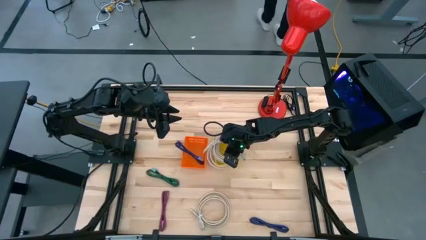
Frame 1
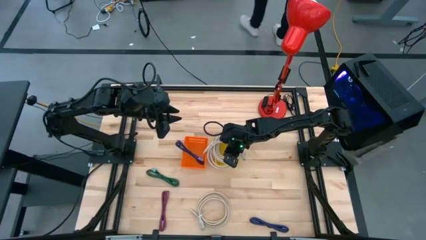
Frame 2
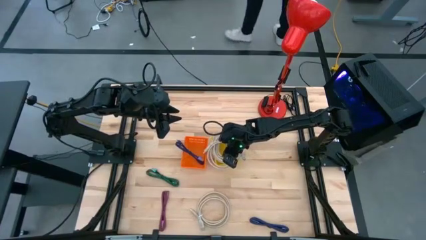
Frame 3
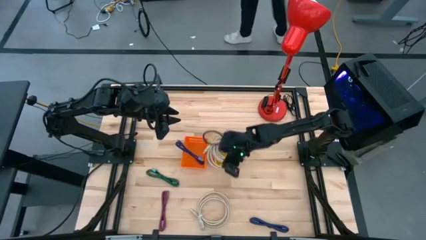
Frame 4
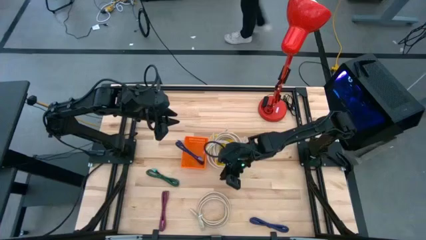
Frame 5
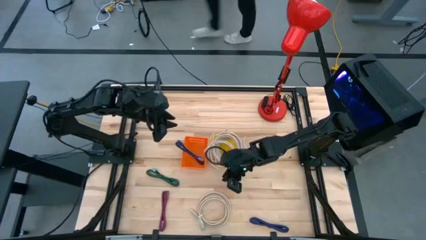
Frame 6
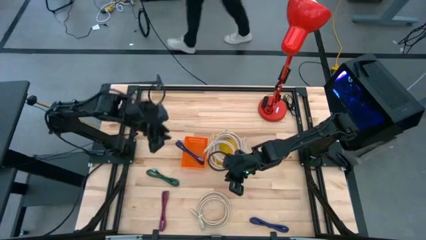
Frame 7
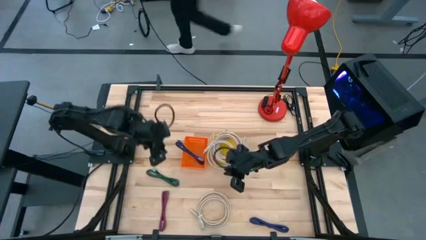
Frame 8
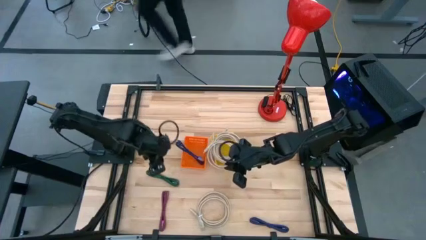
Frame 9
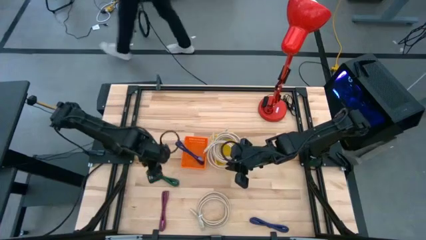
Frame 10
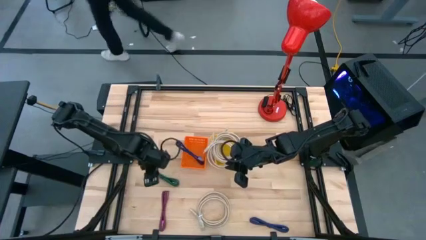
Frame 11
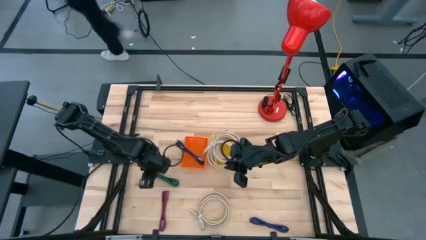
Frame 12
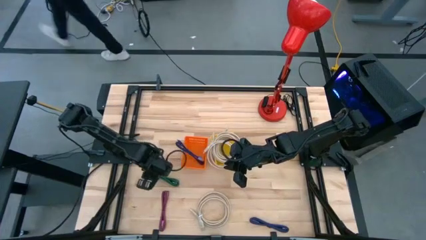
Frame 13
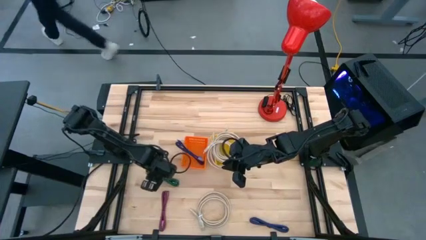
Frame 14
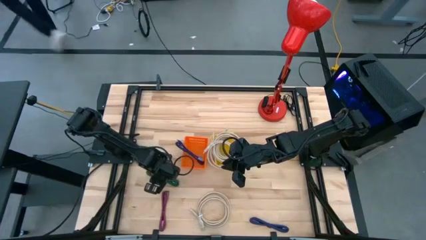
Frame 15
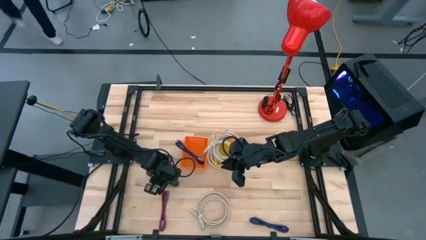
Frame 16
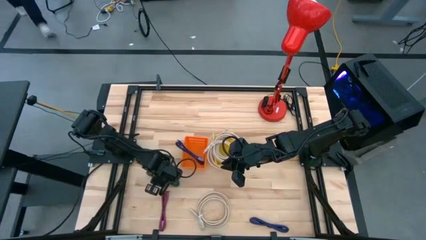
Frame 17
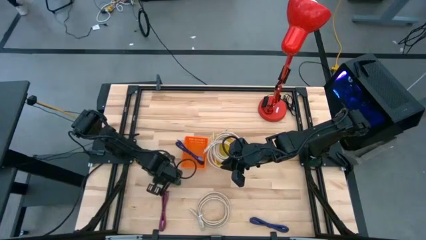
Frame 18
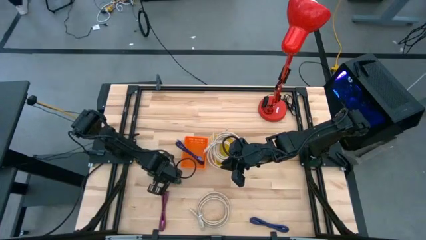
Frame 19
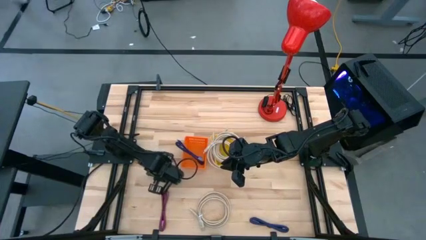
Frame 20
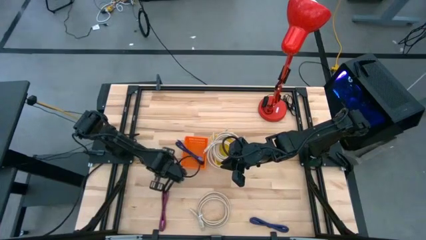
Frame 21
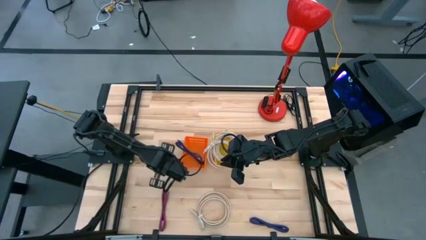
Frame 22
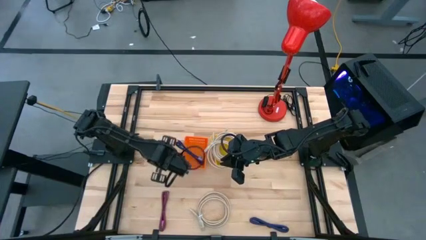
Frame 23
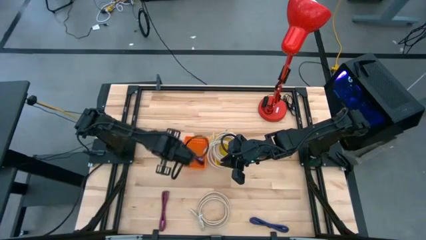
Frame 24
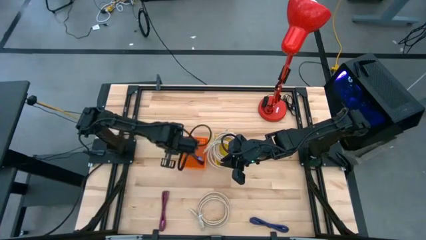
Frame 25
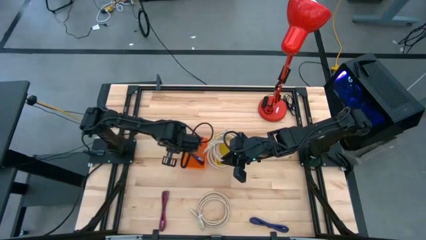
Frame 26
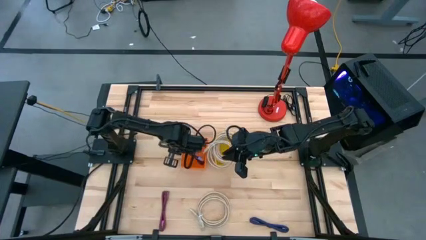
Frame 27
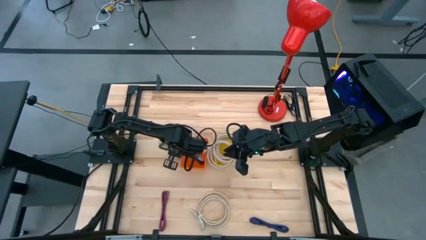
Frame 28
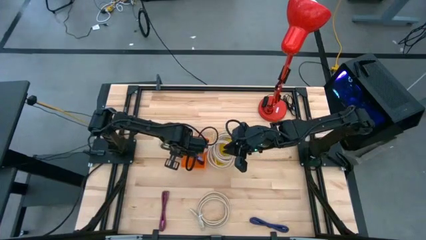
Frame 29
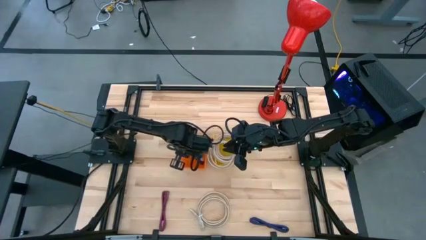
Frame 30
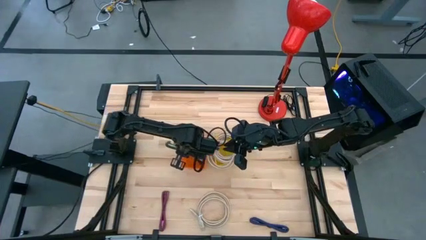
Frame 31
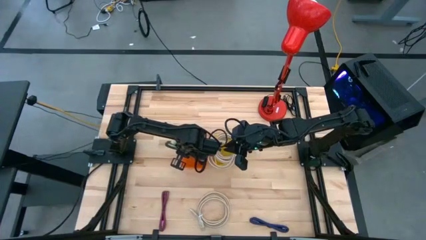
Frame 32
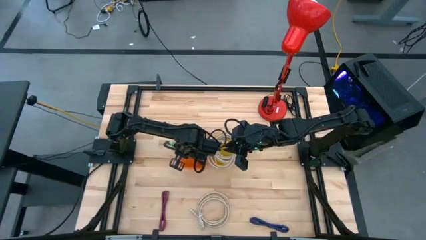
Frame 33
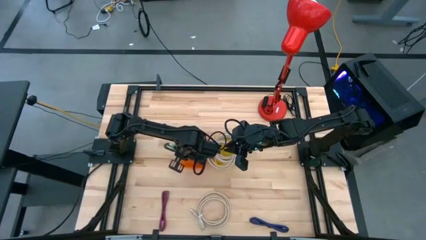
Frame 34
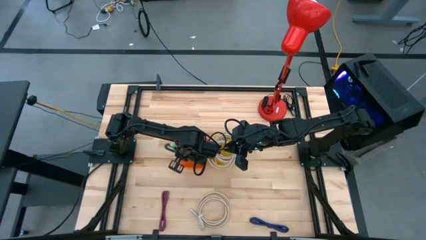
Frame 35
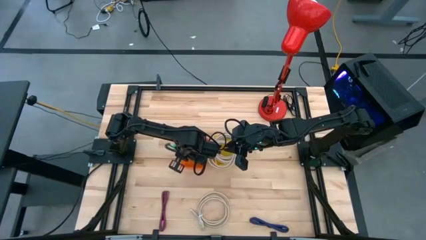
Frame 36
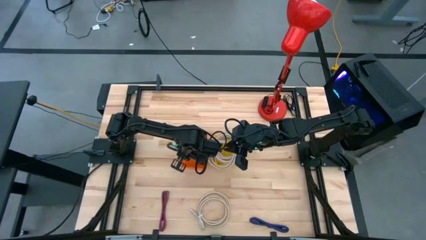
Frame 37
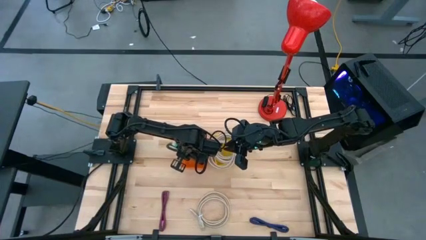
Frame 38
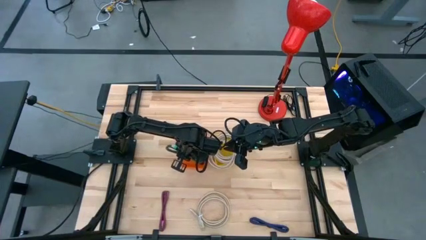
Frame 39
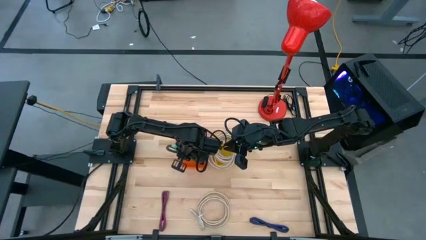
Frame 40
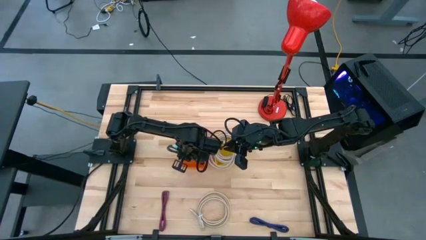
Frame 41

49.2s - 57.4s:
Task: Pick & Place USB Port
Put the black and green USB cable into the orange bin

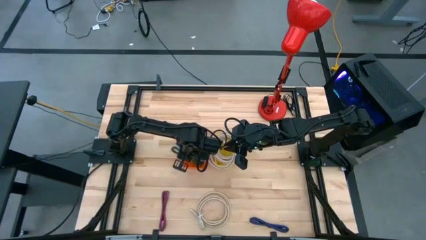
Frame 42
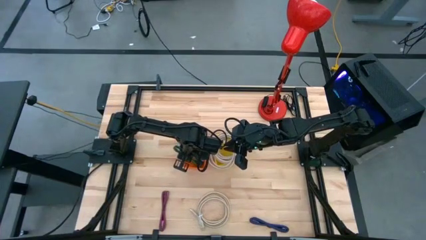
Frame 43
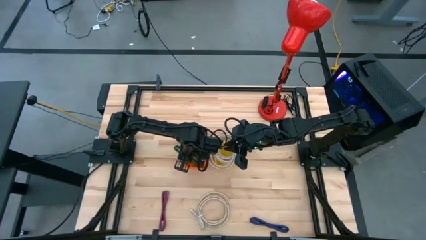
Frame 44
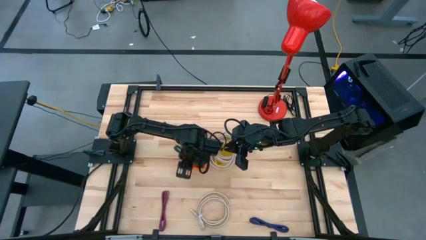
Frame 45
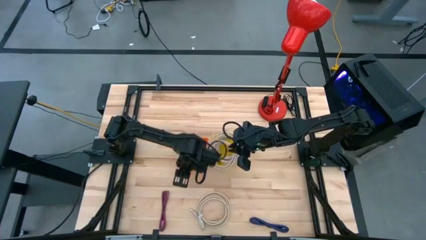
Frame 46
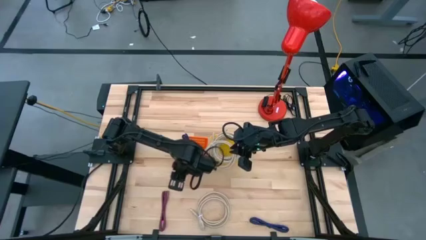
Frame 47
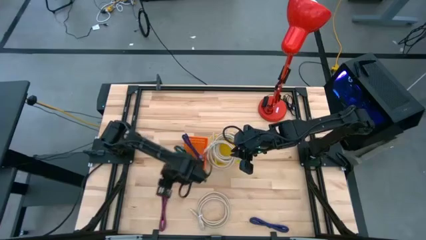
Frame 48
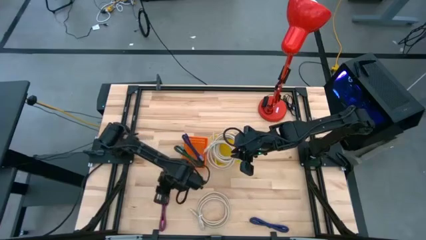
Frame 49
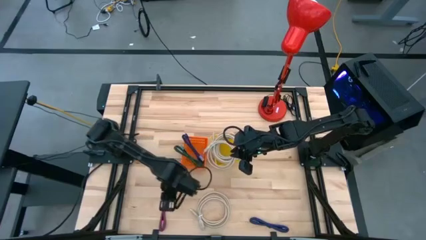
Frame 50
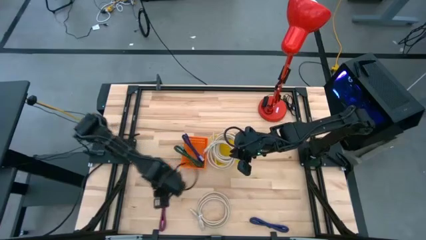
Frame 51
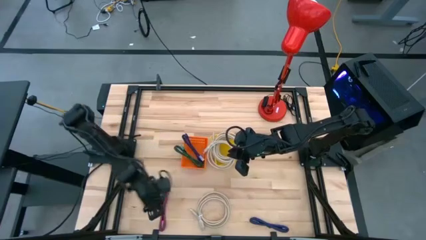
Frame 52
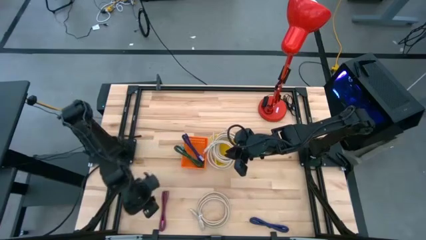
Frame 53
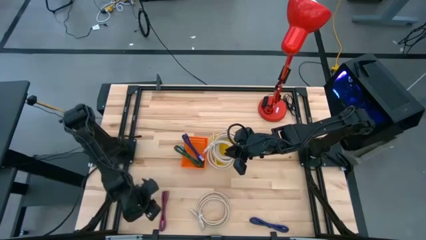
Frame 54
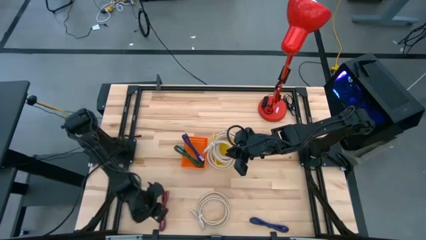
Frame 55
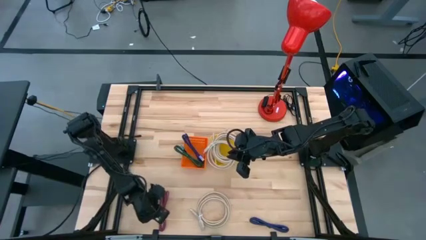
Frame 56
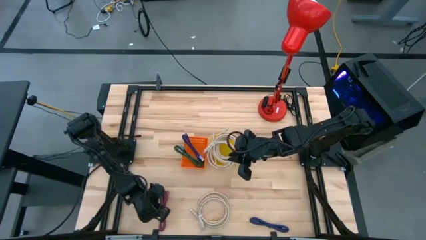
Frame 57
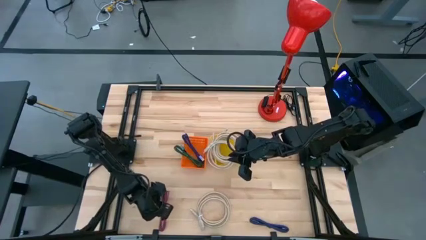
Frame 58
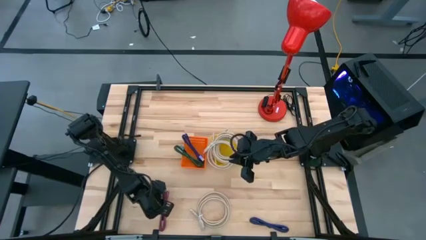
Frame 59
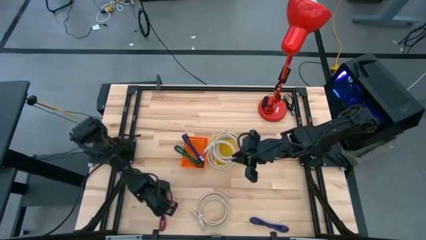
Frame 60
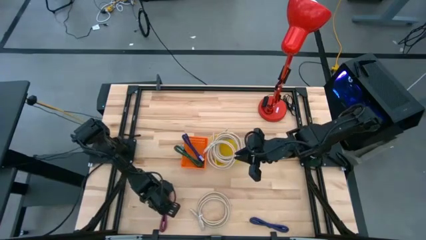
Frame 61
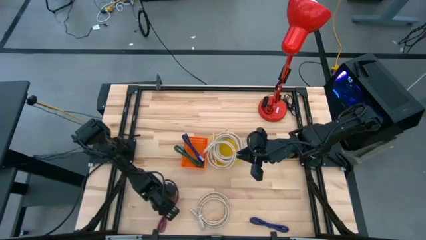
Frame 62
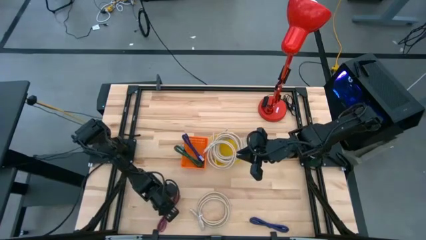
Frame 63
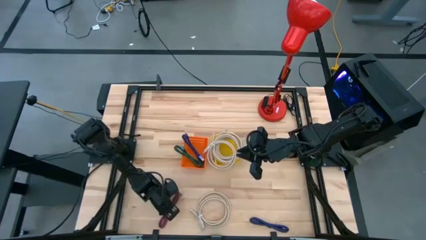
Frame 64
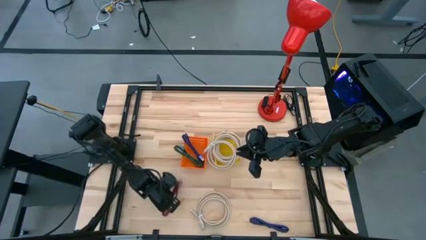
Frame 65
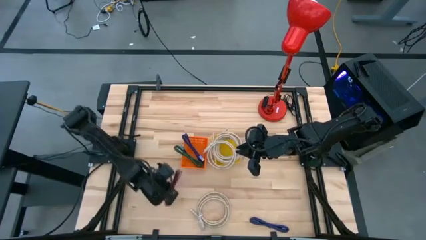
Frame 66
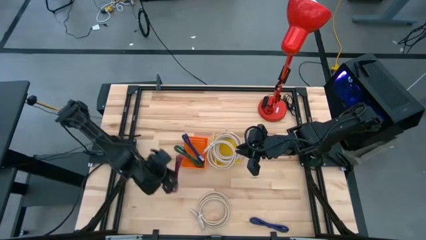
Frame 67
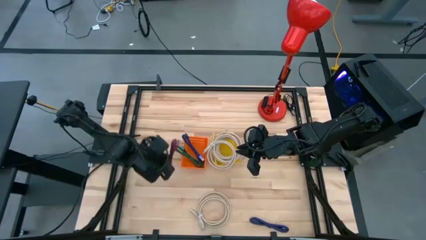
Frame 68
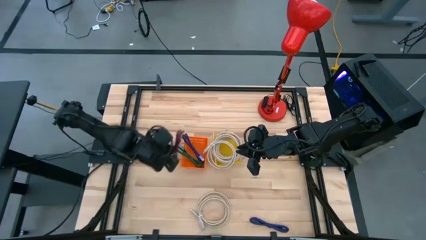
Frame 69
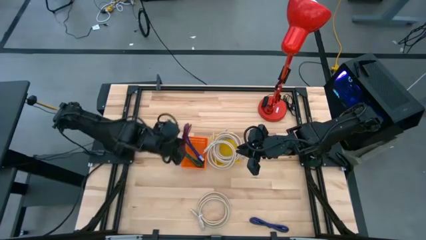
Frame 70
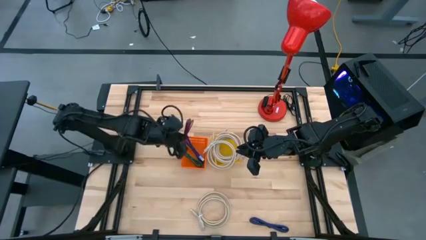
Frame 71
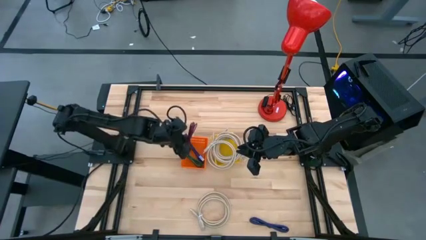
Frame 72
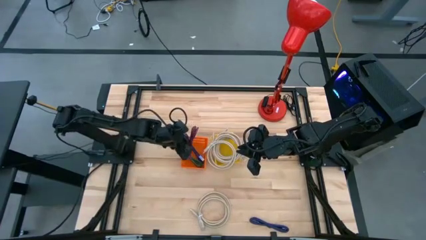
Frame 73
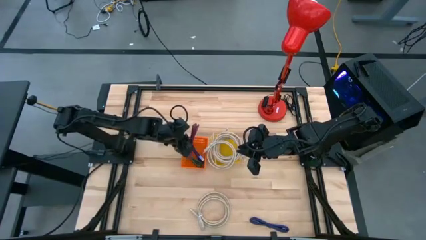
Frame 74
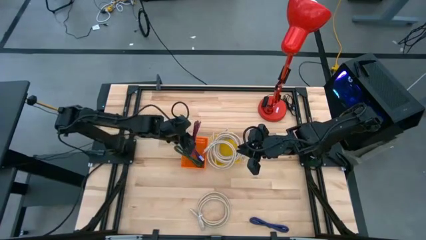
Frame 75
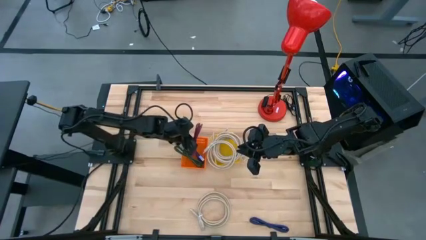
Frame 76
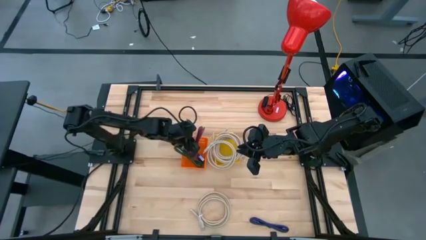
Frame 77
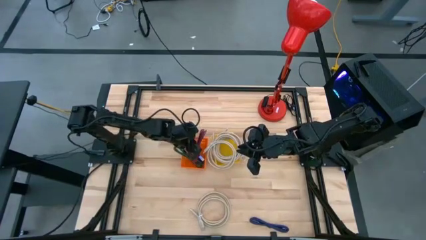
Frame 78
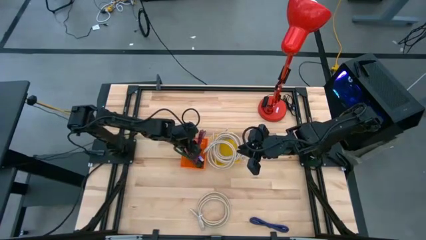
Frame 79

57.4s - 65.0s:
Put the black and pink USB cable into the orange bin
